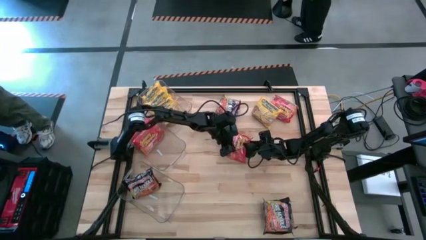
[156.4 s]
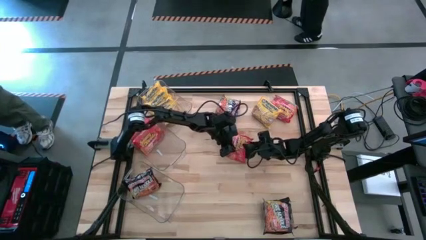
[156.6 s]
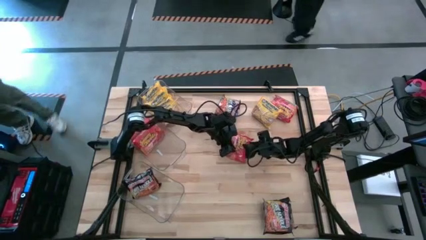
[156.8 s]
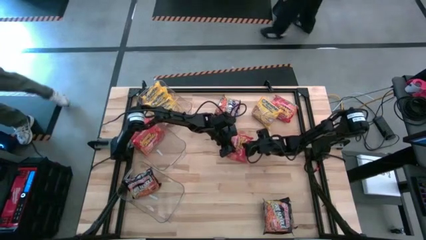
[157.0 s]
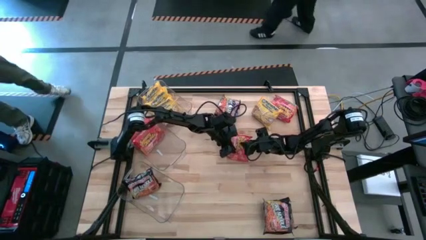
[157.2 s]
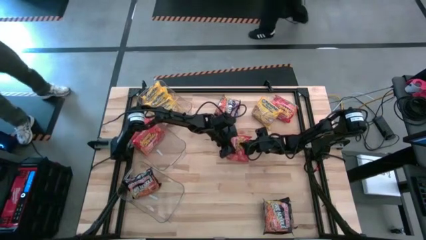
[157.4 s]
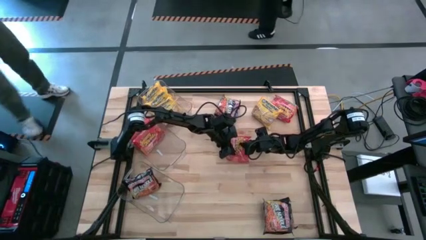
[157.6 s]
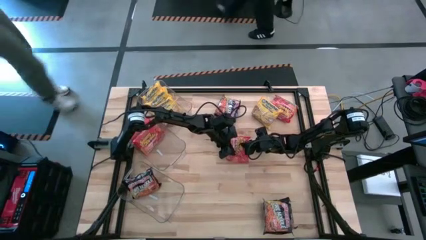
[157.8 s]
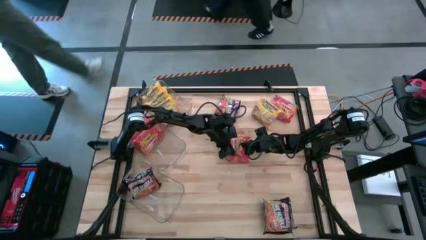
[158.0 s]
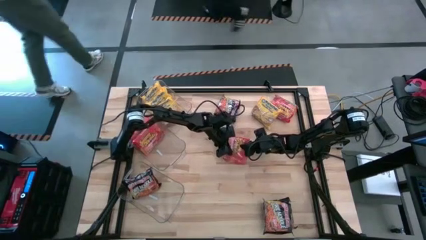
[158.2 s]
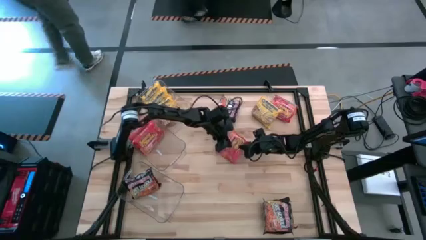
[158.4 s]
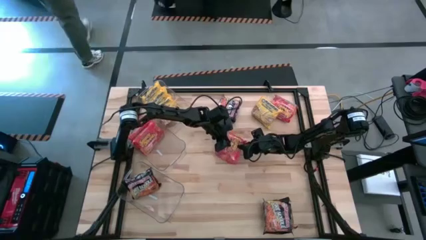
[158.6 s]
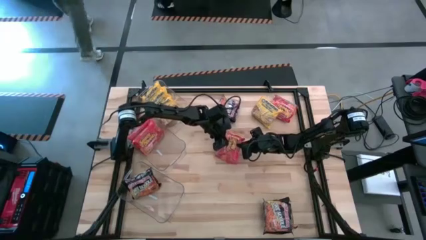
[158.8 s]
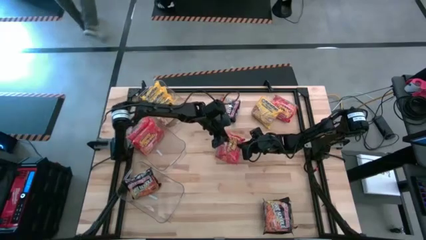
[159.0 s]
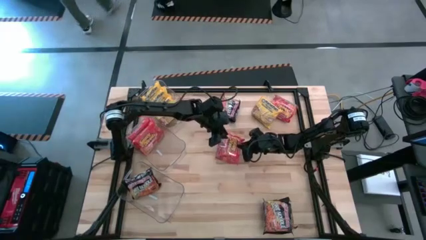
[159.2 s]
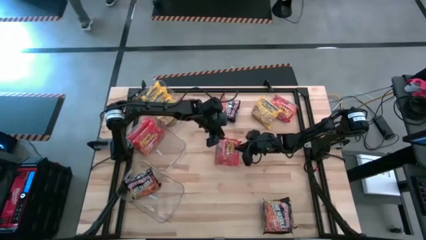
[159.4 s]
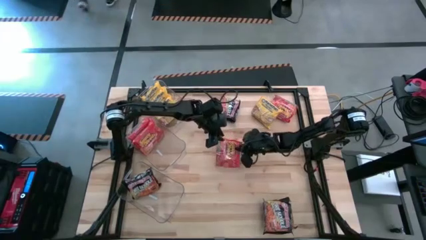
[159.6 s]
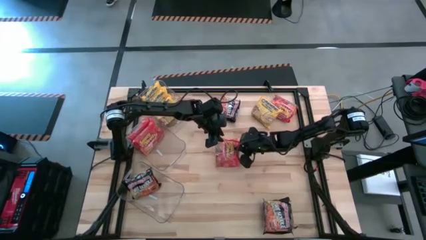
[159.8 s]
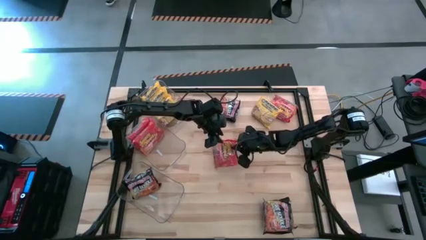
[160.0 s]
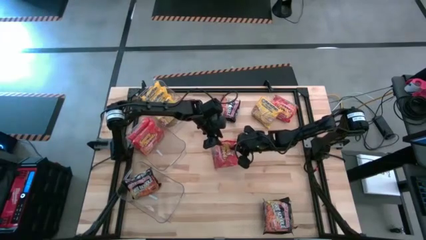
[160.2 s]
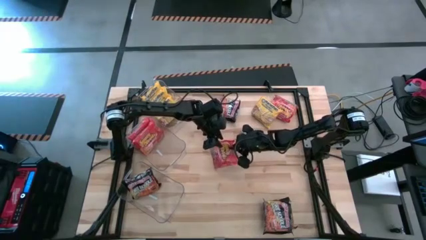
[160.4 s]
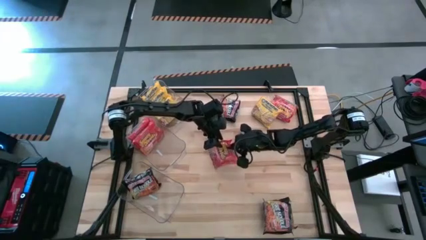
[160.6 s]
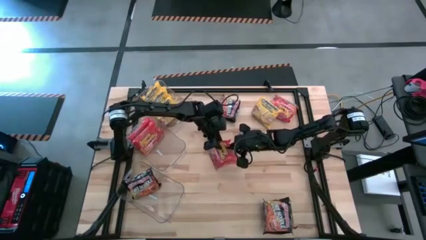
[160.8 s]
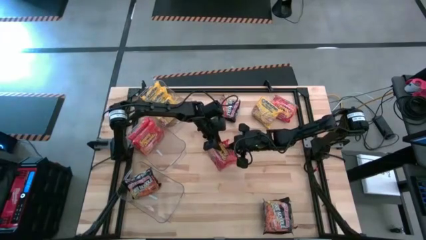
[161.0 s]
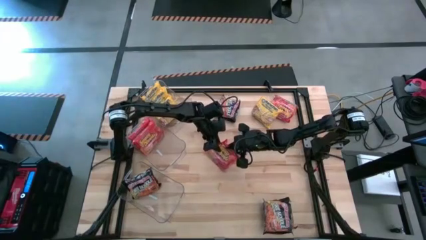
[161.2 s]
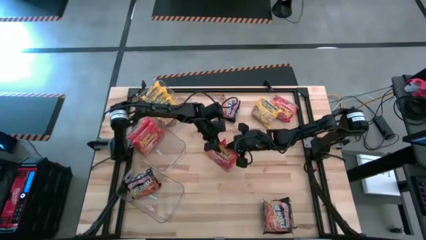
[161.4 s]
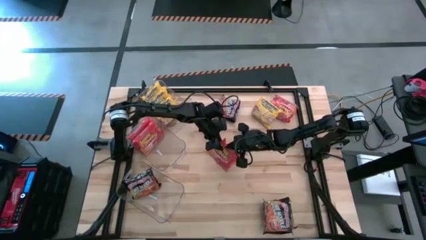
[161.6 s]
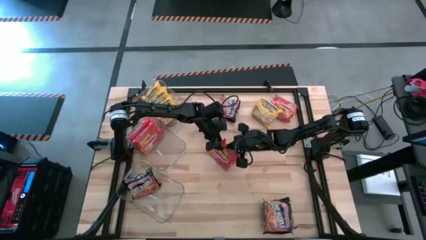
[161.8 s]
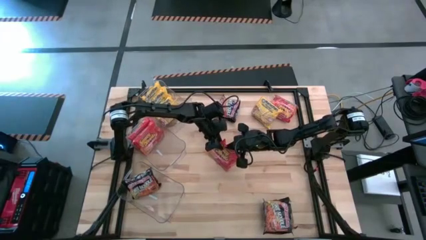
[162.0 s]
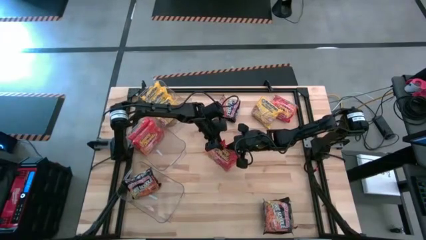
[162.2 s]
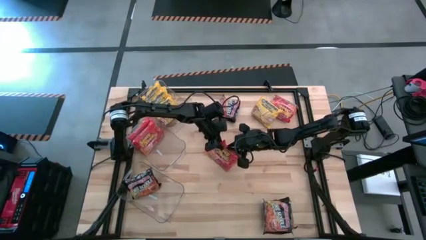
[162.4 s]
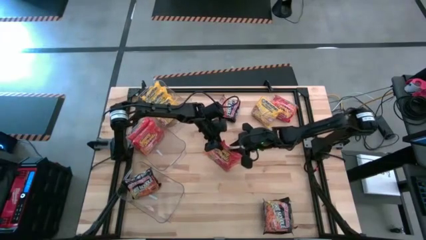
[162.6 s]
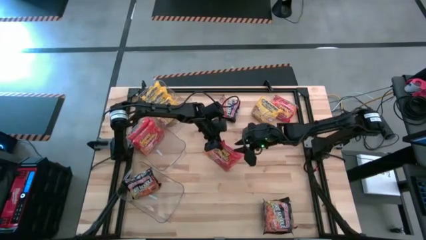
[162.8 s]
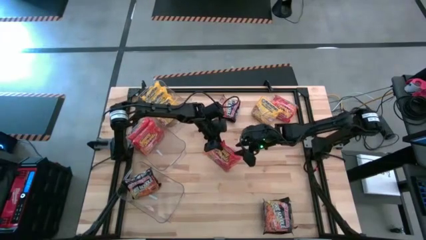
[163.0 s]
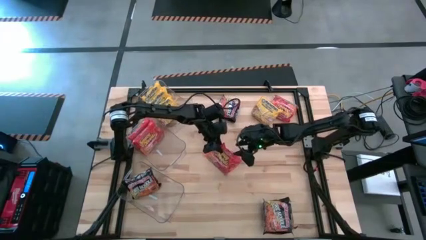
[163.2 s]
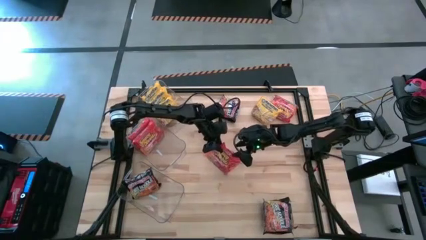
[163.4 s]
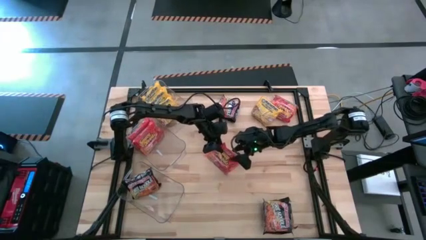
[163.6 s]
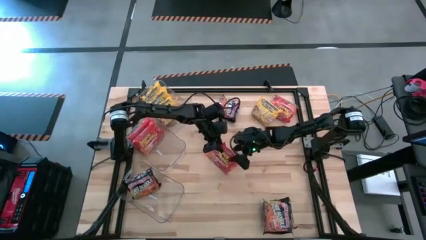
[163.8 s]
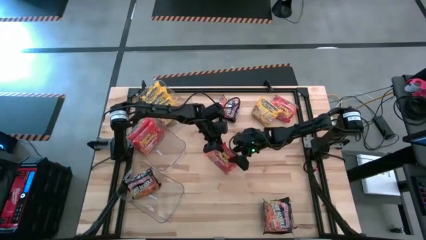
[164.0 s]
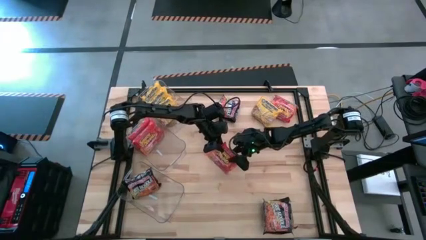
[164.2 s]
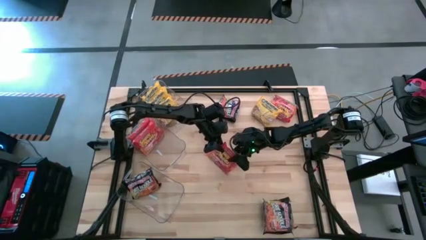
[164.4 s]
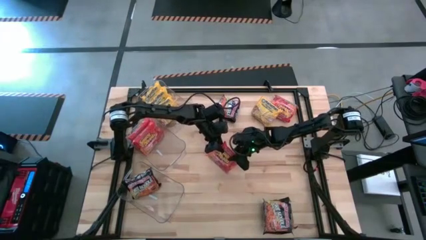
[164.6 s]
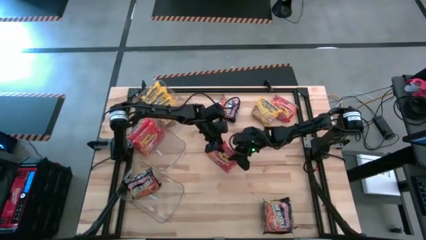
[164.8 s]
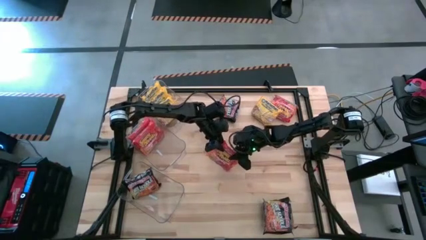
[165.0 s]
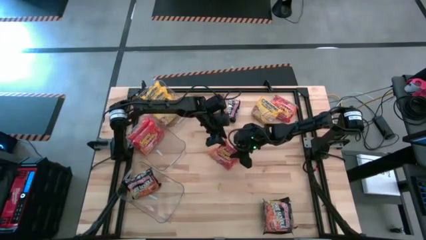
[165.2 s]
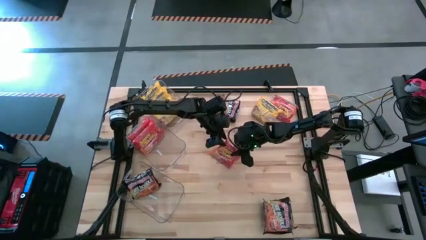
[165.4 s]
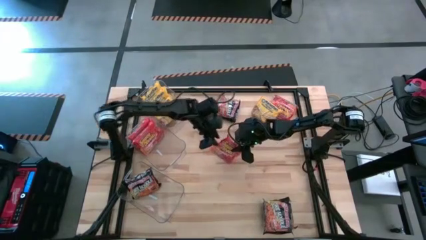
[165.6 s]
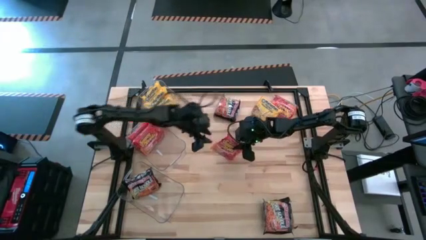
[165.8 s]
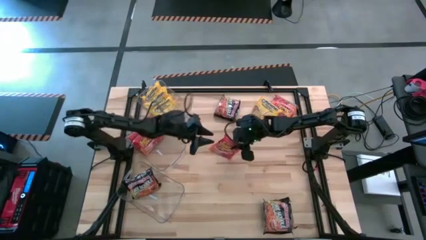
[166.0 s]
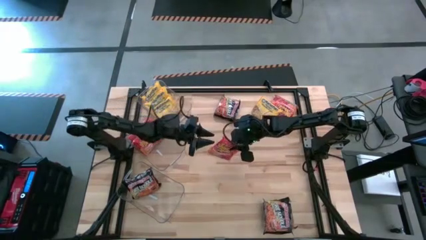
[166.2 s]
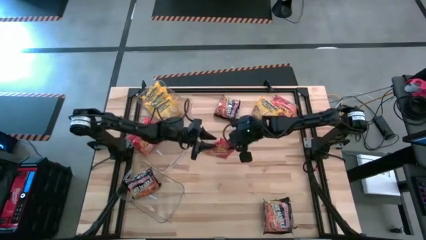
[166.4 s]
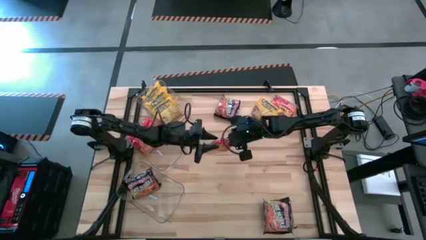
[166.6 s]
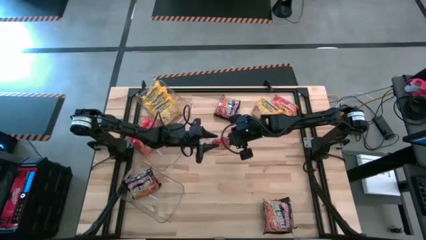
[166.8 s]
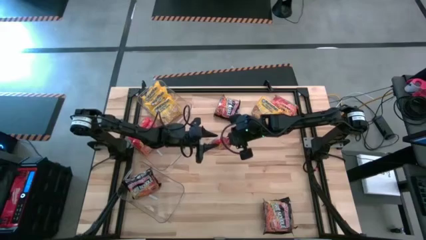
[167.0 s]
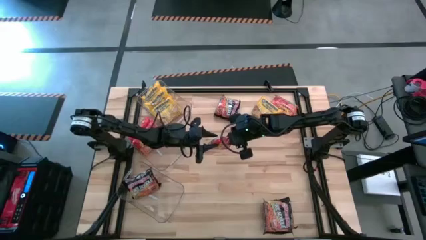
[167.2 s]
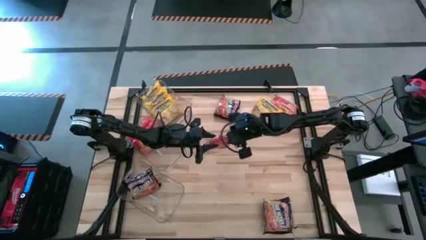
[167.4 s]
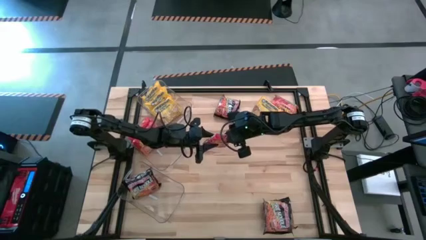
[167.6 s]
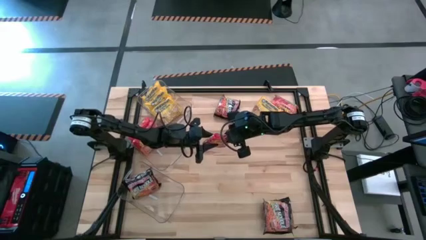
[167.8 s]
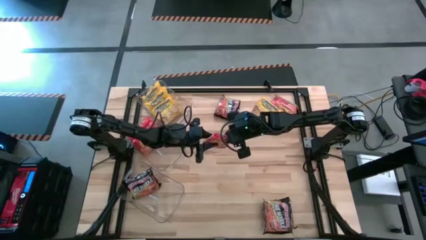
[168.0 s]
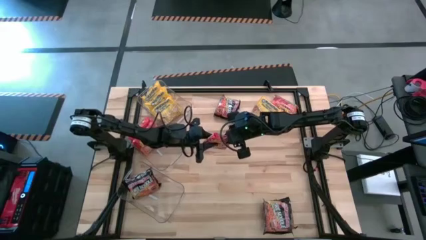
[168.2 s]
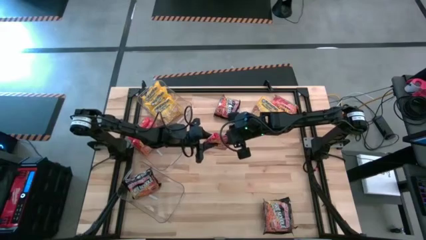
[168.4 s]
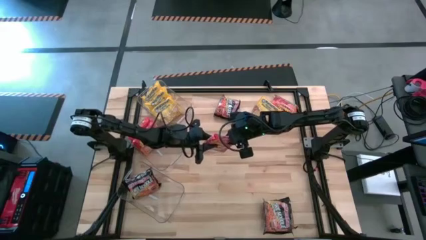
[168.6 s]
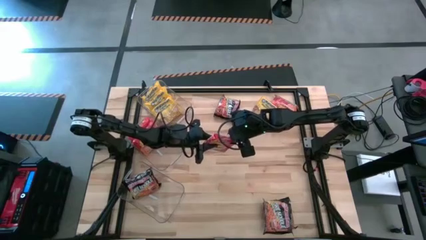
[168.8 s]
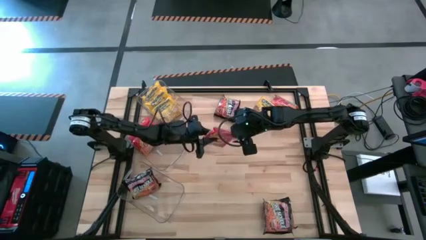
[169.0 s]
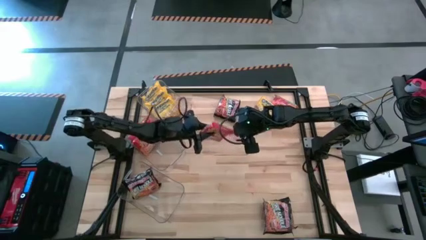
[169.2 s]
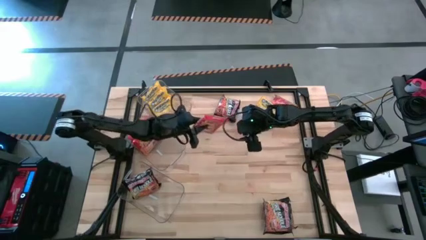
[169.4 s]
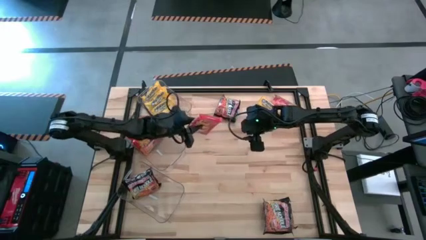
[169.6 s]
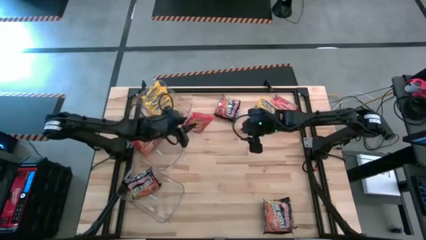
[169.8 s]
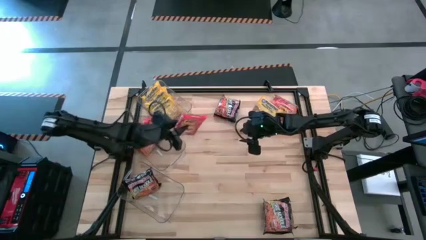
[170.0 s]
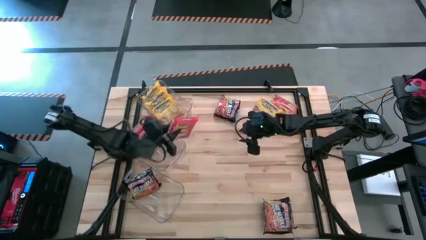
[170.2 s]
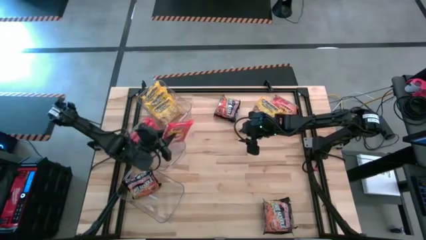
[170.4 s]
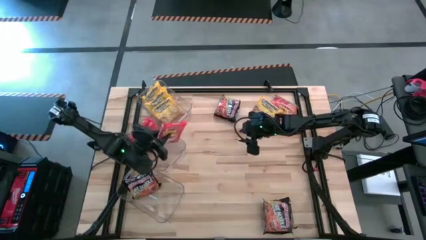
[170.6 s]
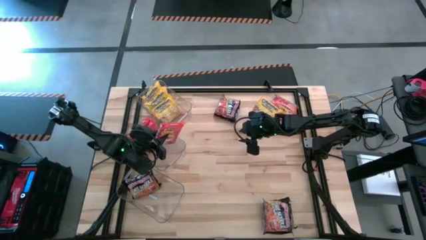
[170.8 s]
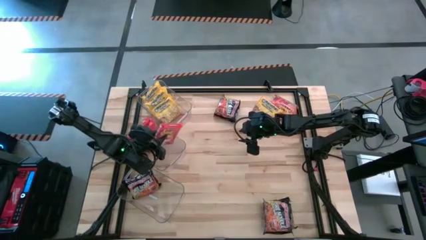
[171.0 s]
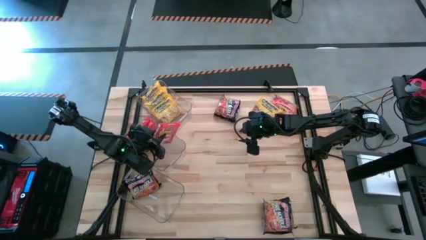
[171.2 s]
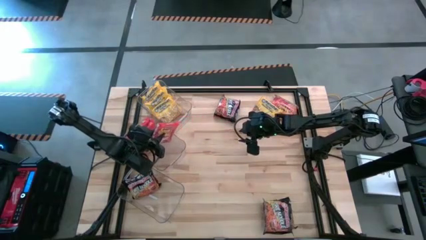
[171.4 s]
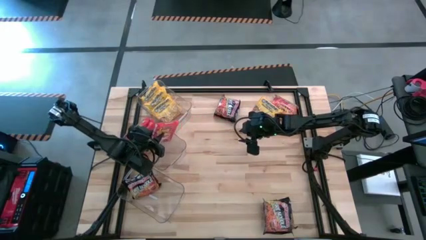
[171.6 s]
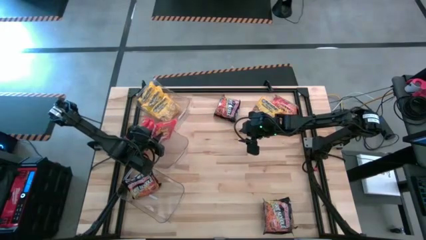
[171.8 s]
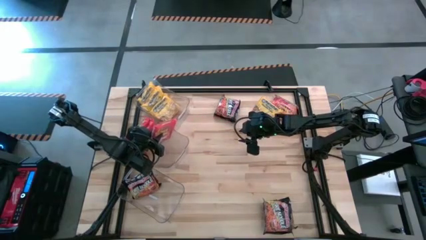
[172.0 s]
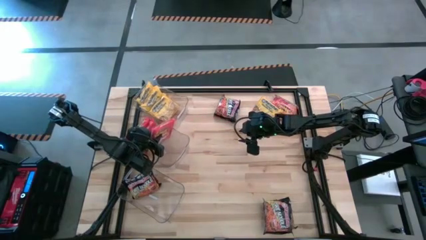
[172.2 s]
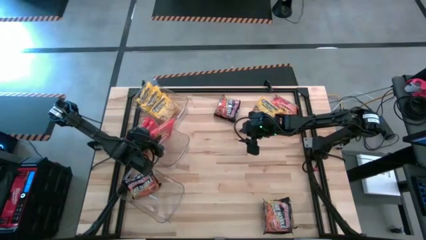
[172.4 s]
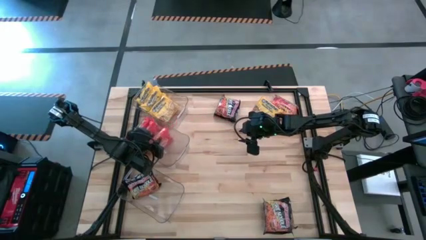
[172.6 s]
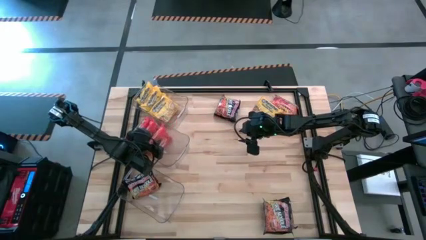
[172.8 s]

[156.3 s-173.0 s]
Task: Sort Maruchan noodles
Put the orange noodles pack into the middle transparent bin
